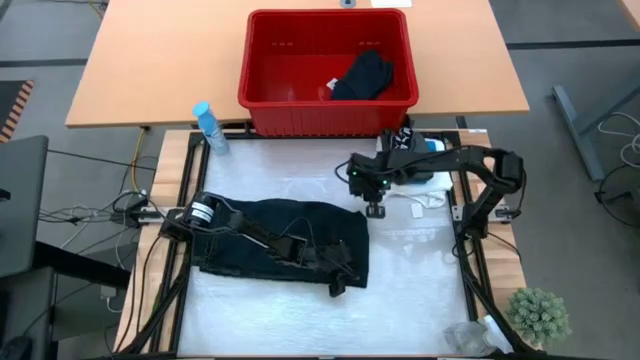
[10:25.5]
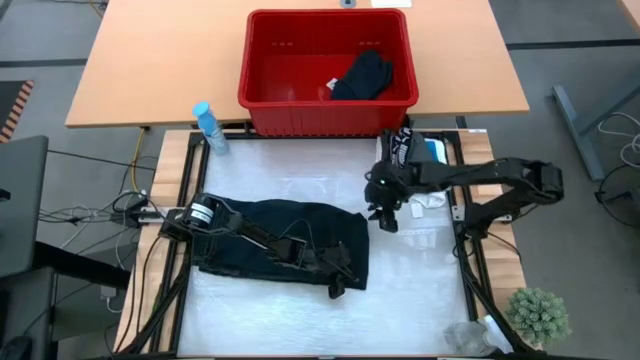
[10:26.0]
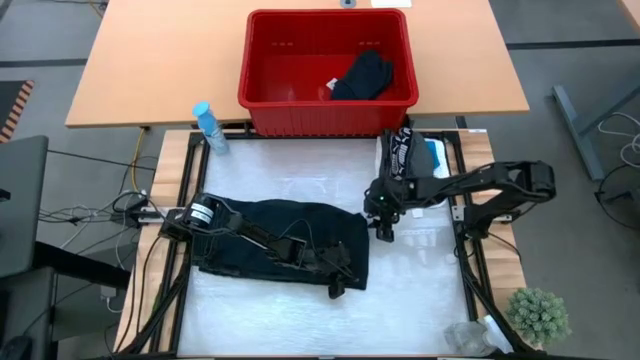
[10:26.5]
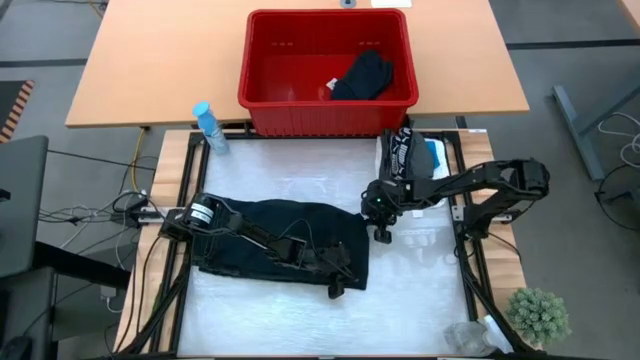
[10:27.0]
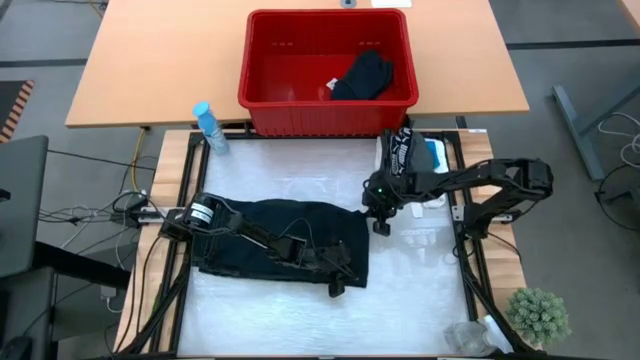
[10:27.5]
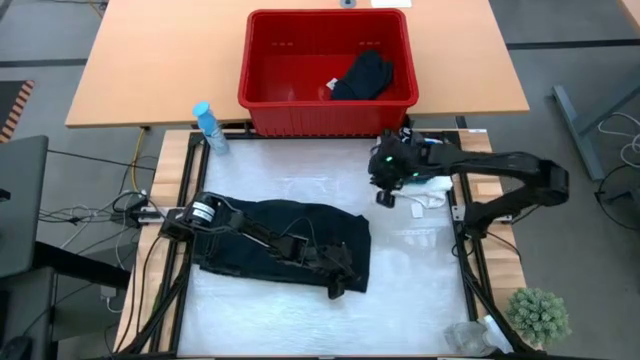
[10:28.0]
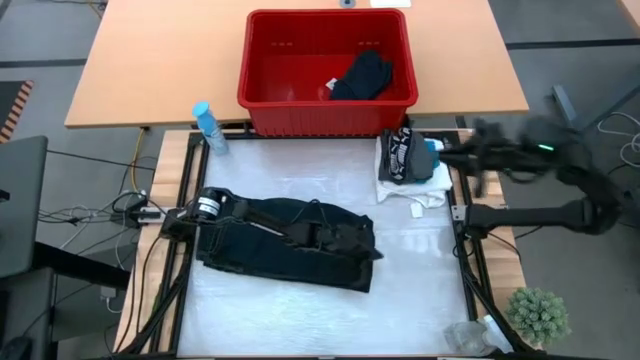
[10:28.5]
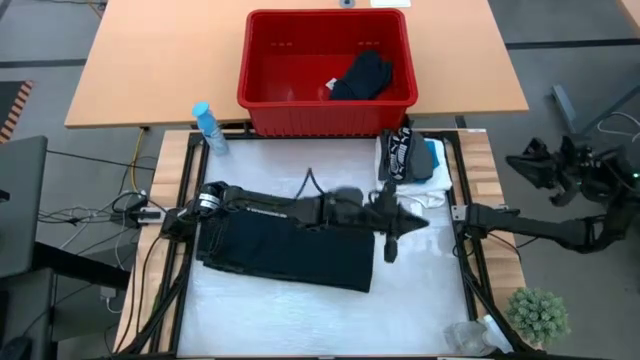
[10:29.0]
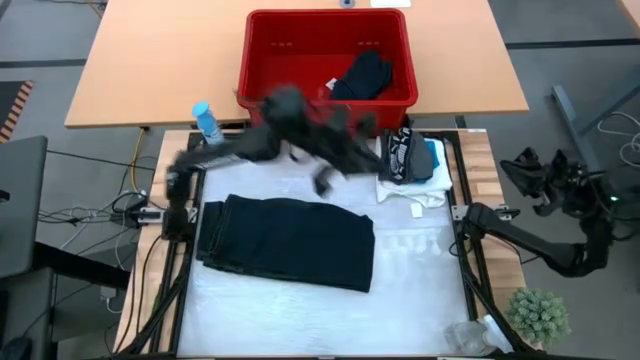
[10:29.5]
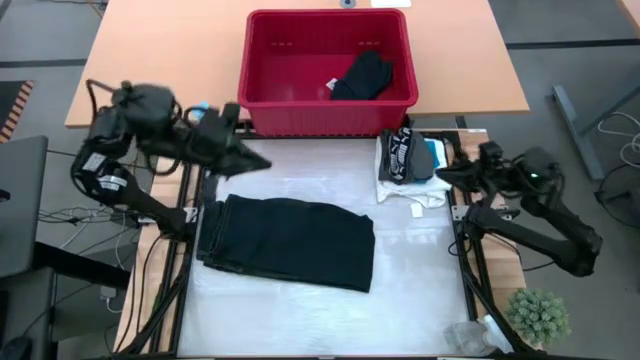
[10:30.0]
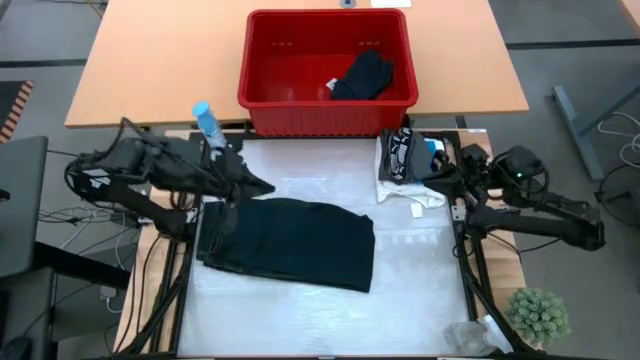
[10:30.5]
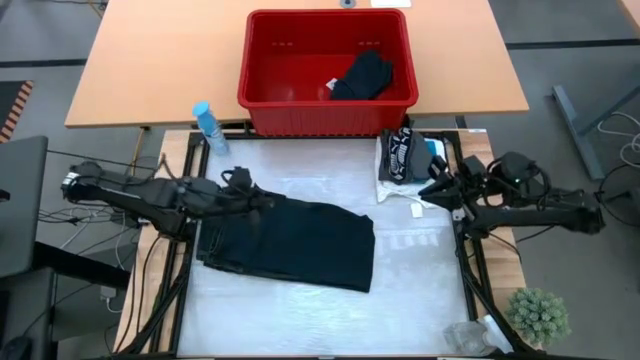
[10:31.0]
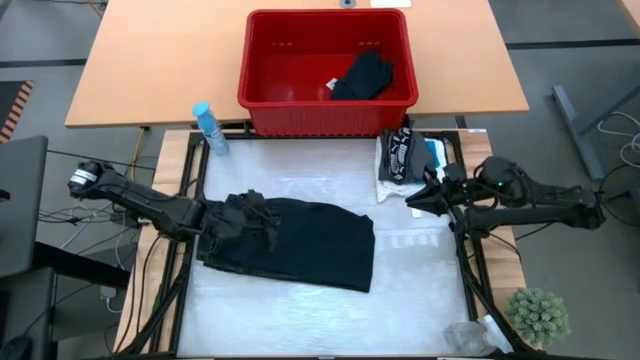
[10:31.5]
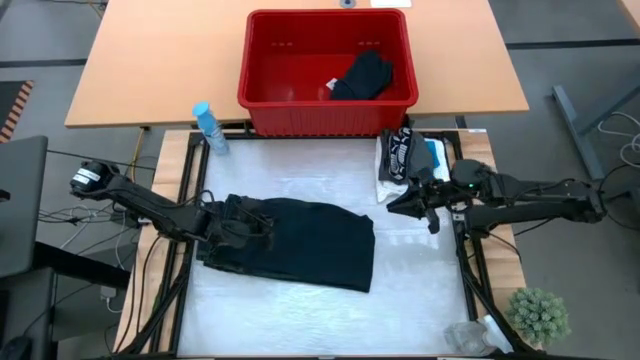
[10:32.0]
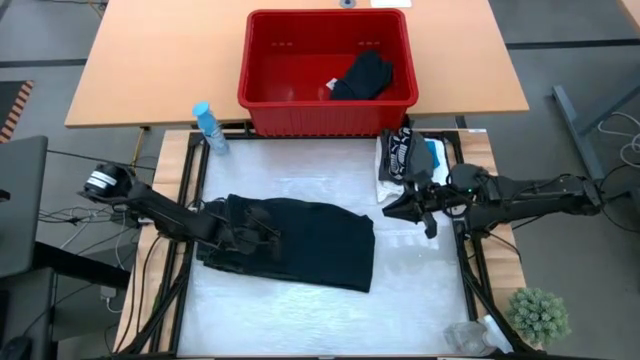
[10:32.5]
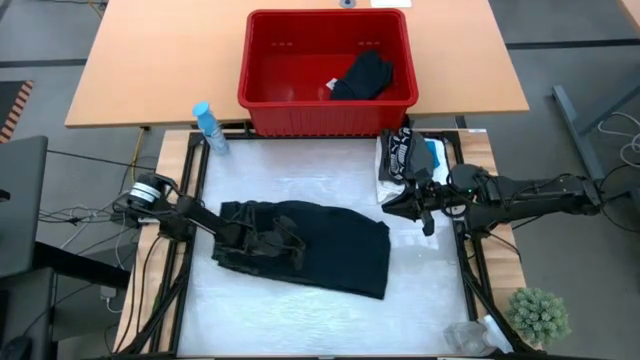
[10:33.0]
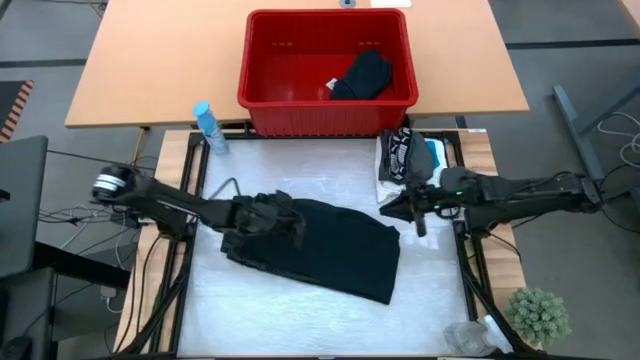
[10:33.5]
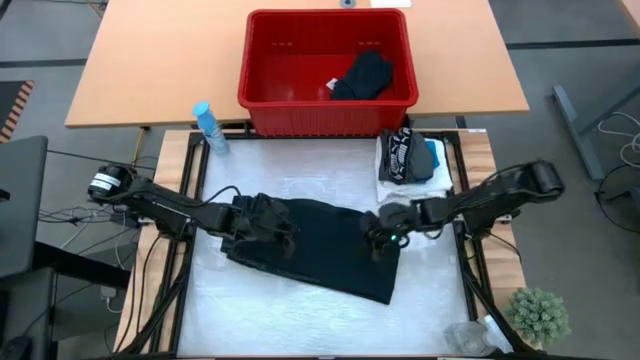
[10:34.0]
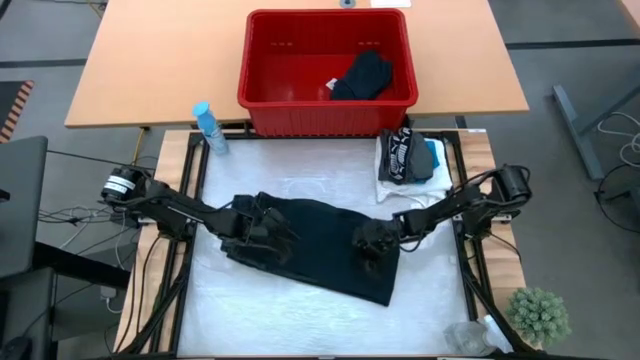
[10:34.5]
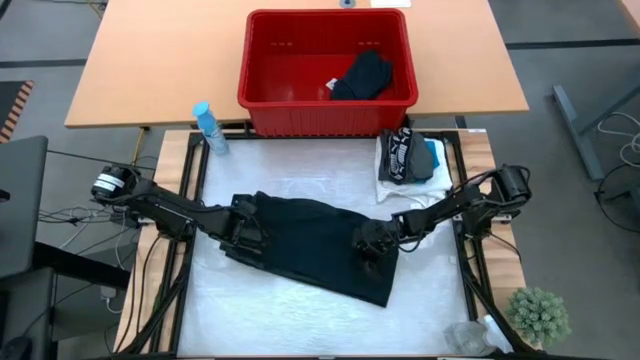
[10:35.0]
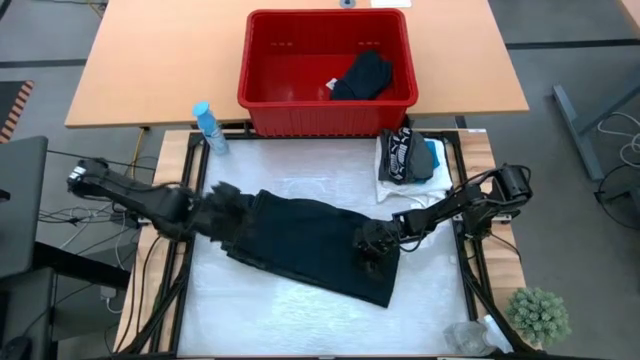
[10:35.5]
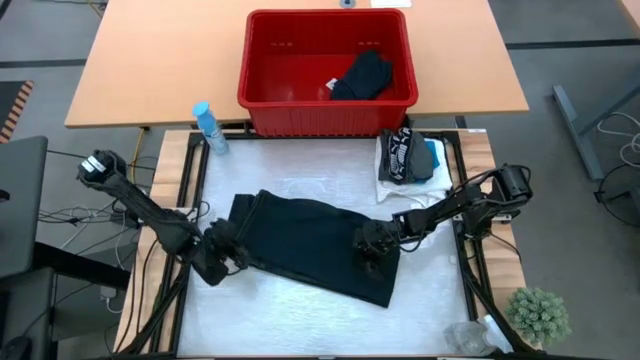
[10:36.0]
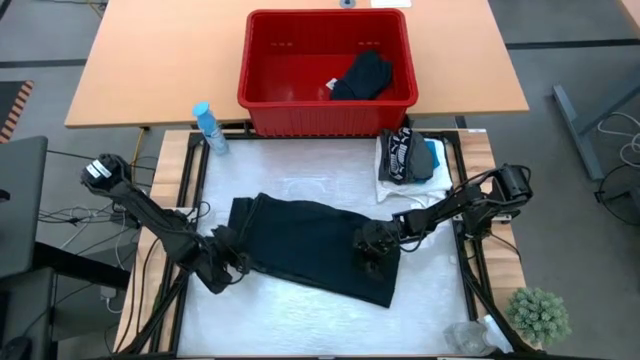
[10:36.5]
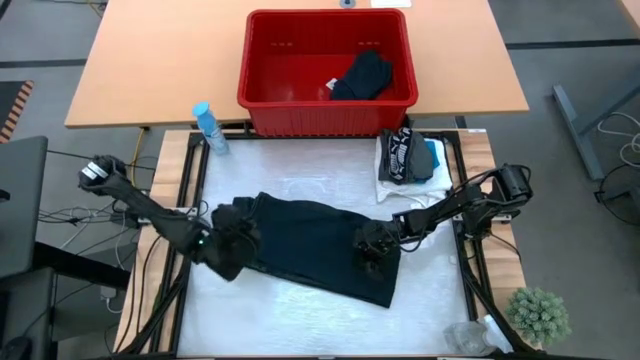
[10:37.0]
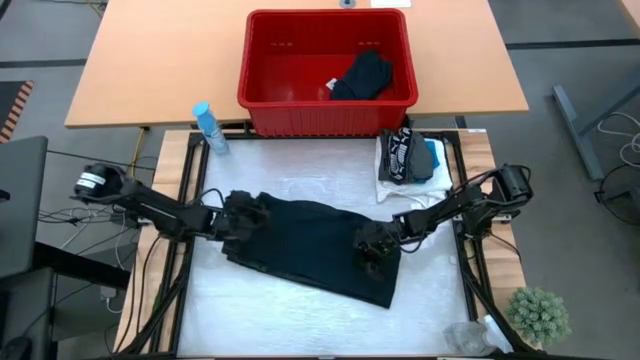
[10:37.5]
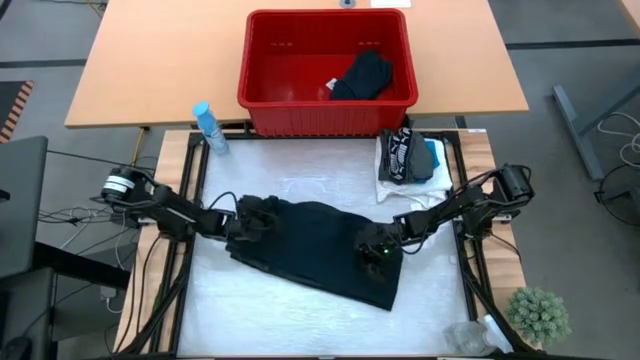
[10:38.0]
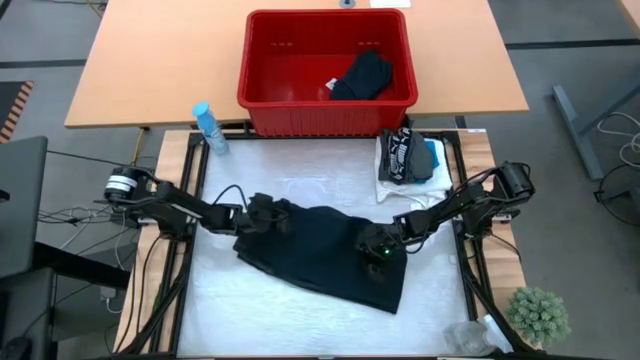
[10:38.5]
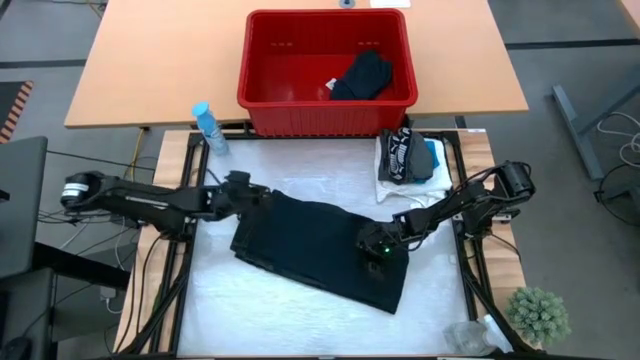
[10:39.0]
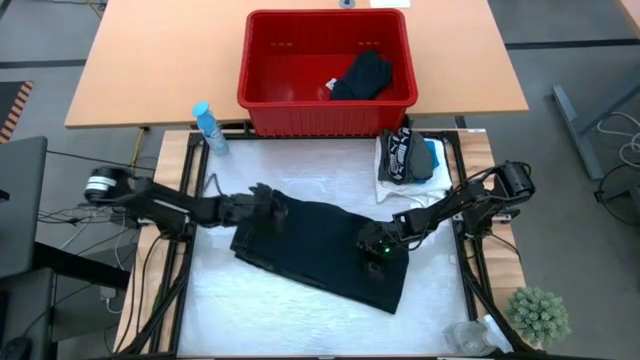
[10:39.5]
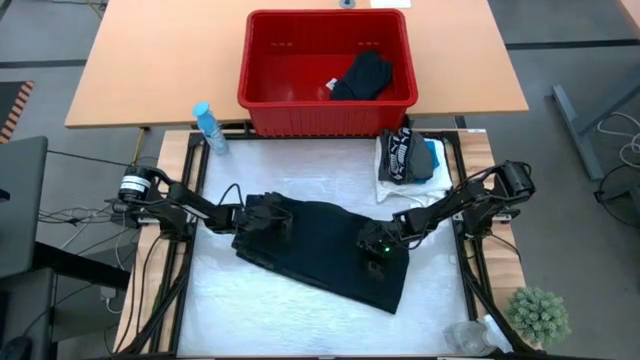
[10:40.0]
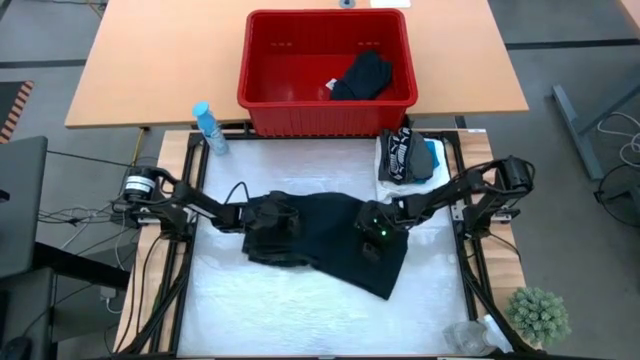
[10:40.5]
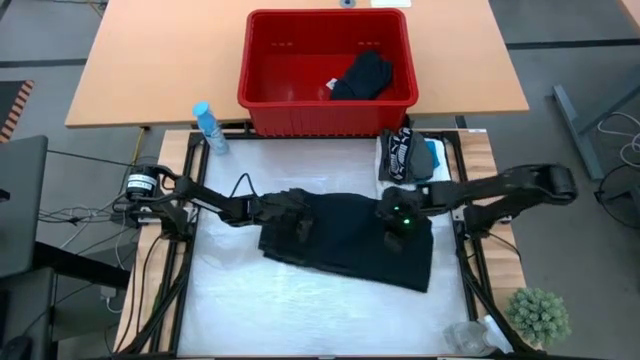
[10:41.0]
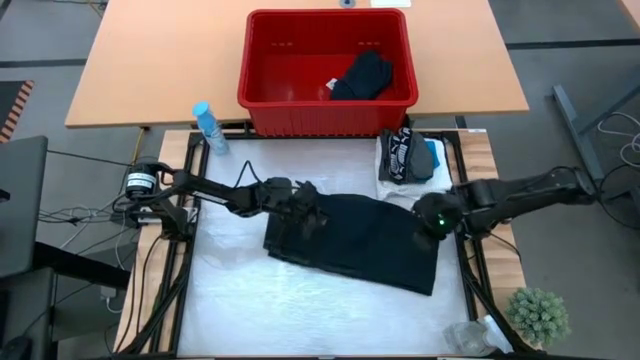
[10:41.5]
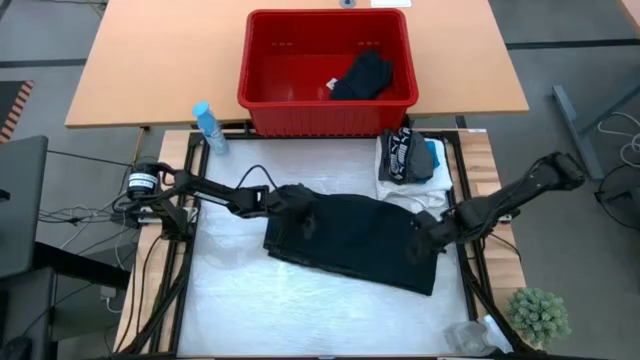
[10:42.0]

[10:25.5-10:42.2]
Task: Fold laundry
Fold the blue pants

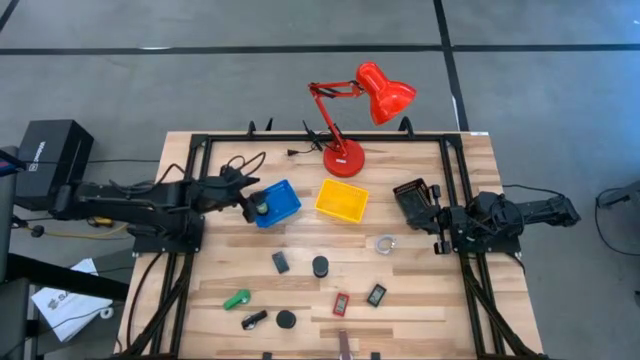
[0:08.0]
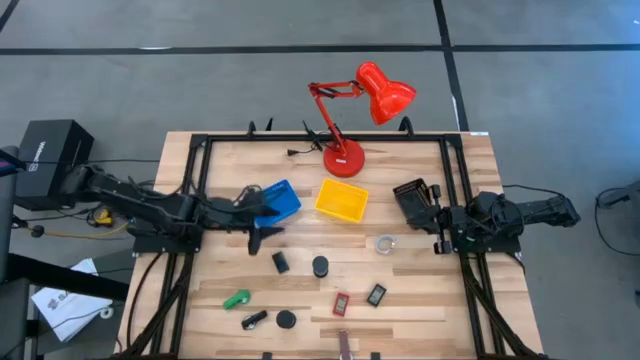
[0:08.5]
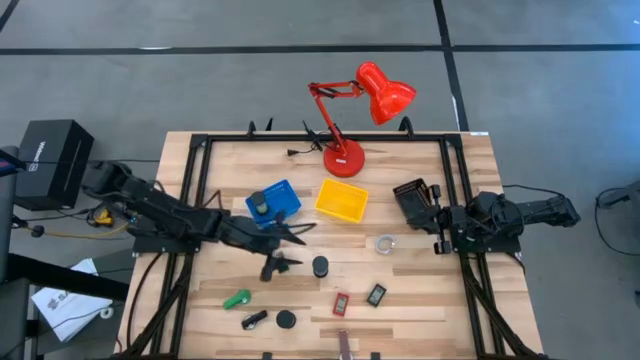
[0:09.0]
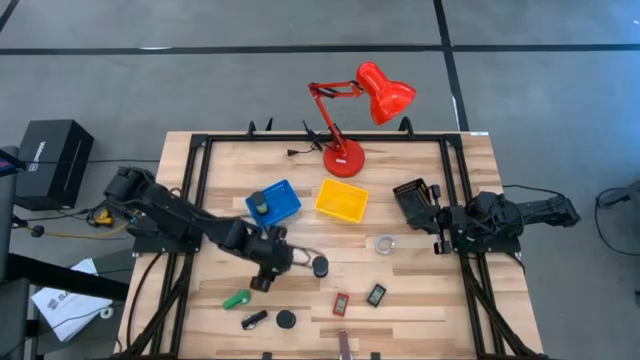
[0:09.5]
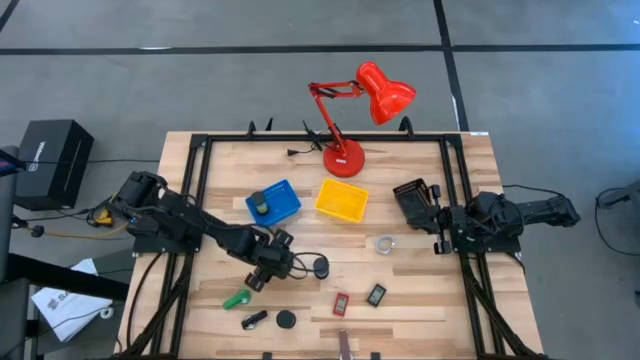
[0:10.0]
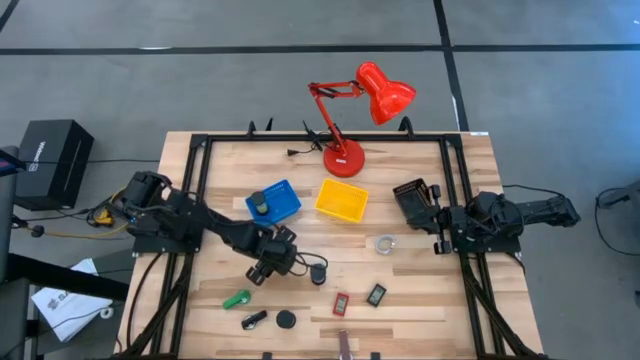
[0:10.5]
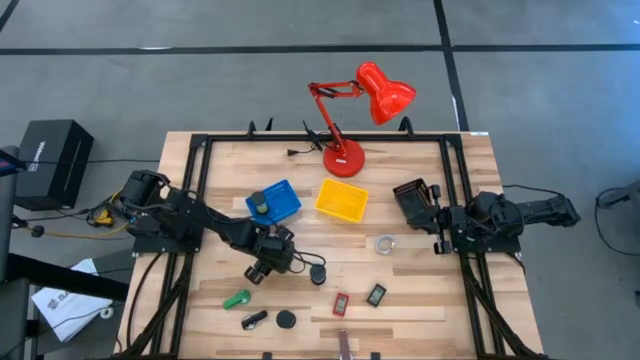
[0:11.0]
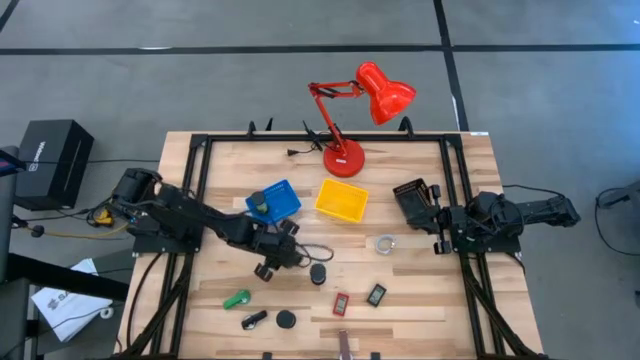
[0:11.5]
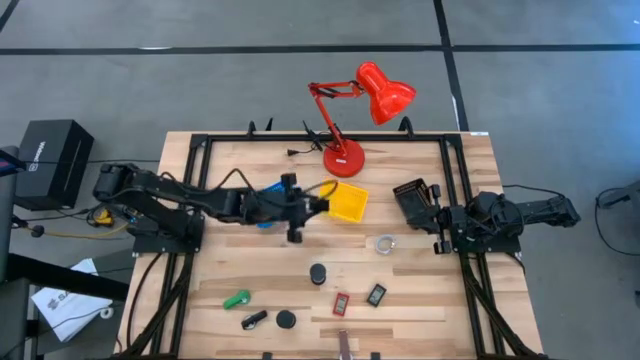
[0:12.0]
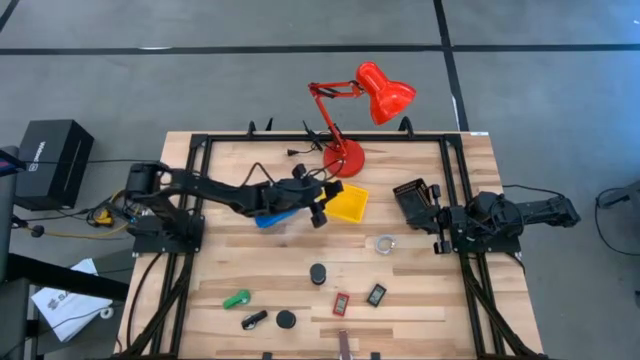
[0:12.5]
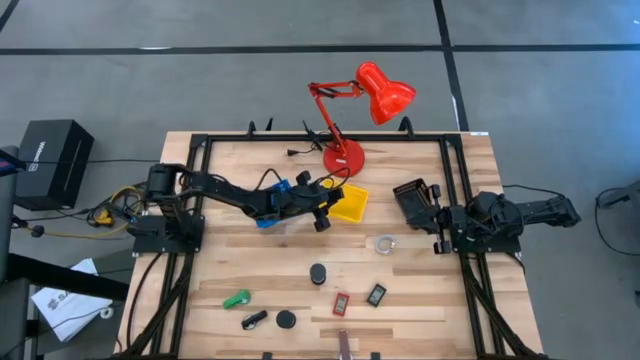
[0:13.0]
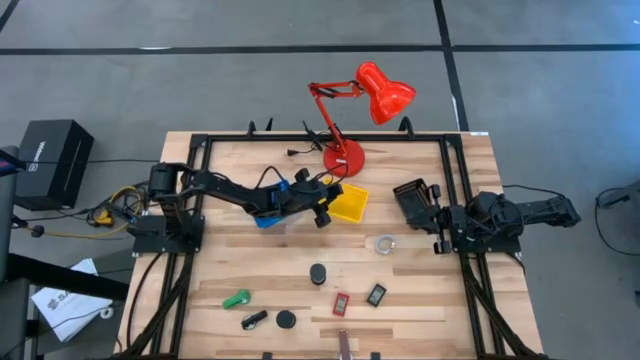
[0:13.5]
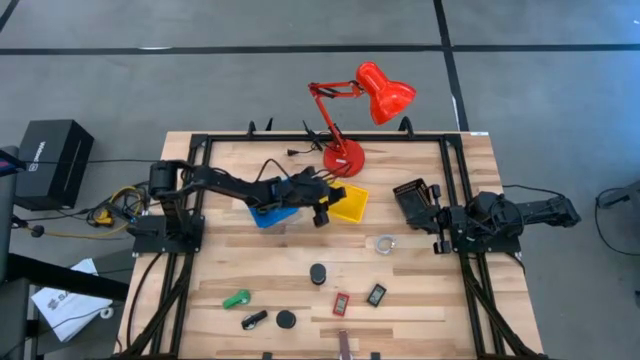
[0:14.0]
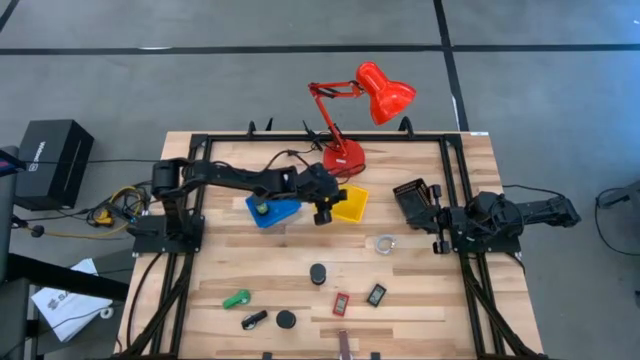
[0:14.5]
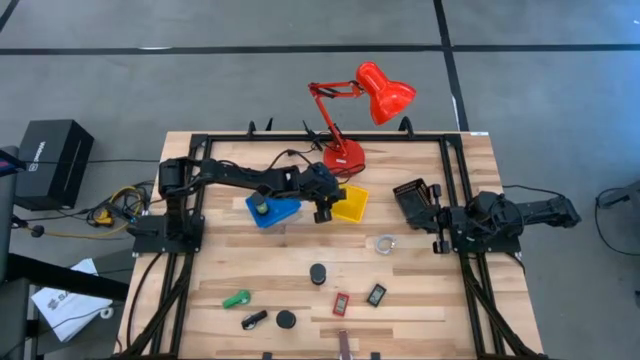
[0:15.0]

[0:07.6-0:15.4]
Task: Pick & Place Office items
Put the left black digital clock into the yellow bin
